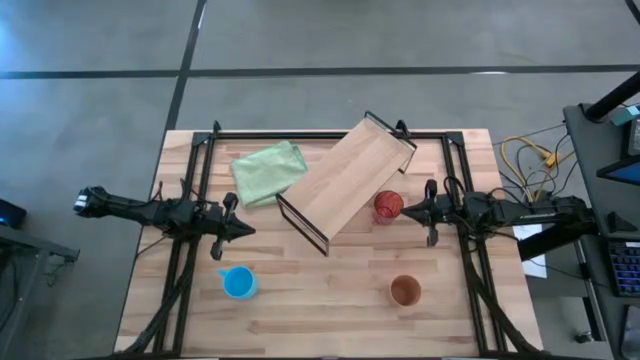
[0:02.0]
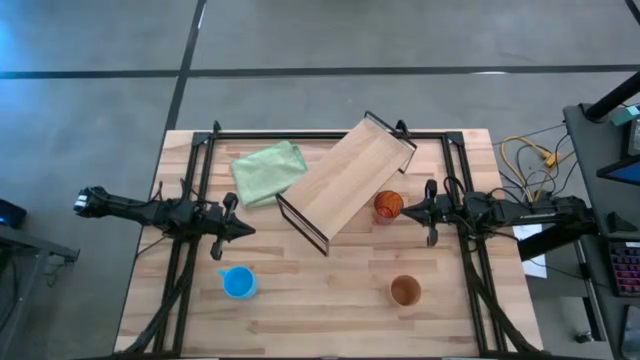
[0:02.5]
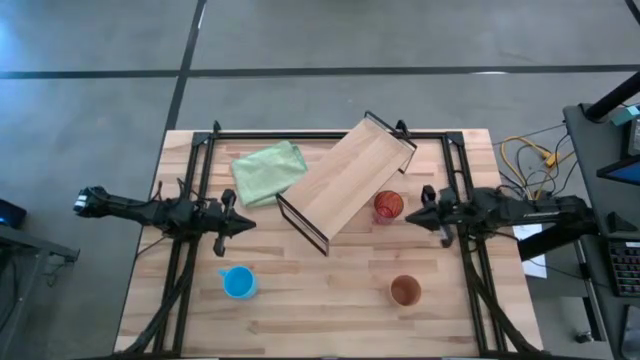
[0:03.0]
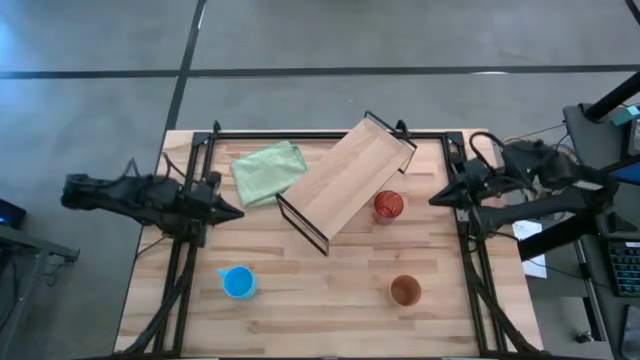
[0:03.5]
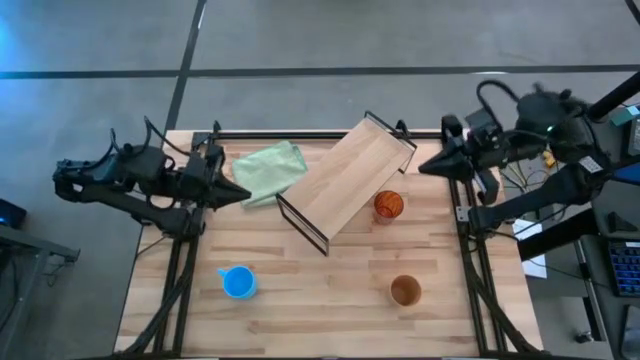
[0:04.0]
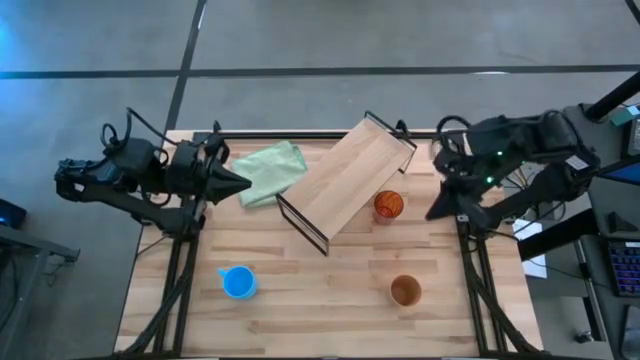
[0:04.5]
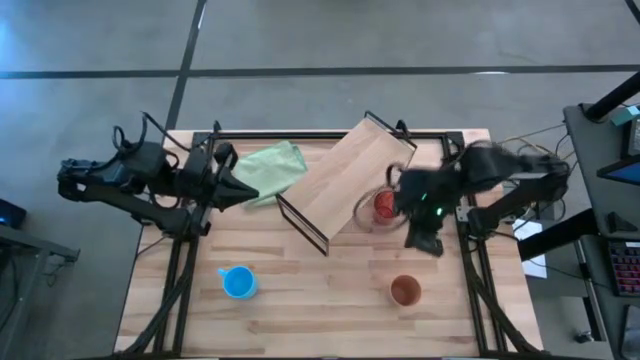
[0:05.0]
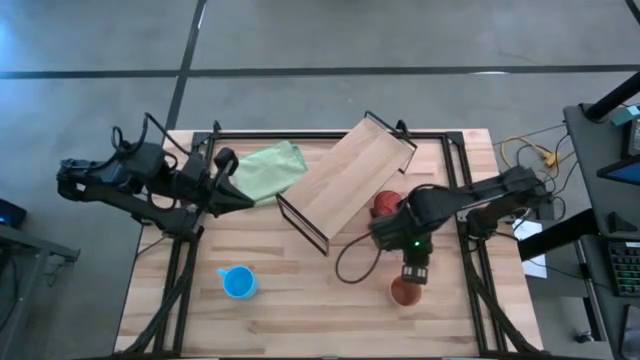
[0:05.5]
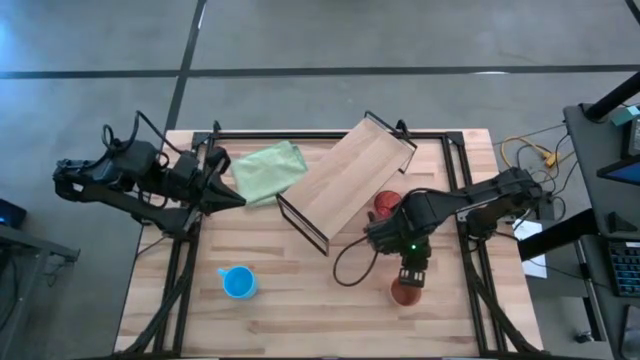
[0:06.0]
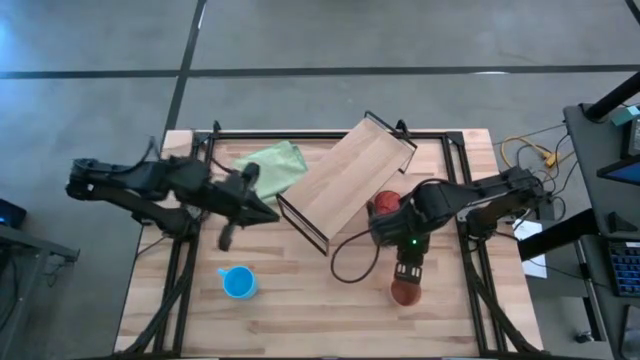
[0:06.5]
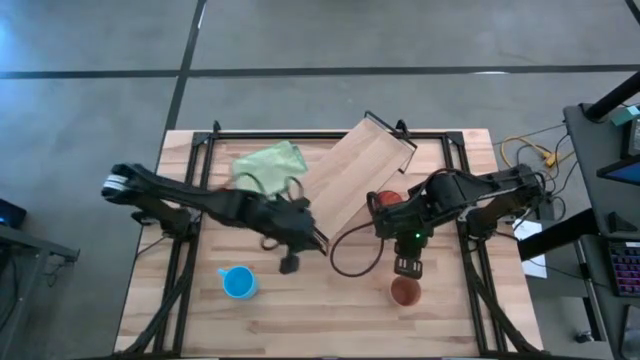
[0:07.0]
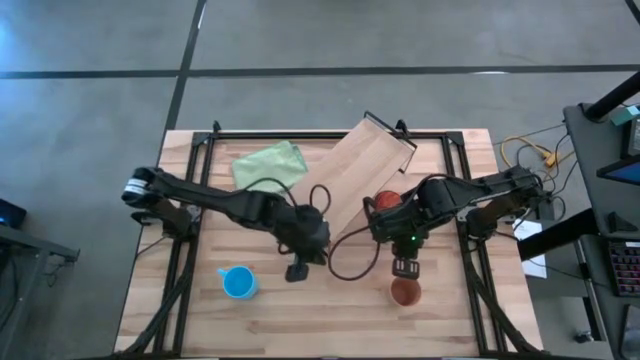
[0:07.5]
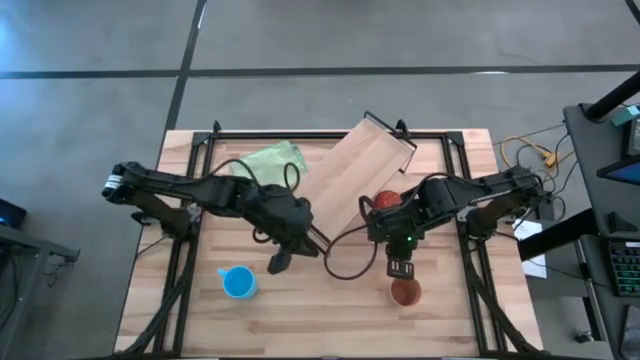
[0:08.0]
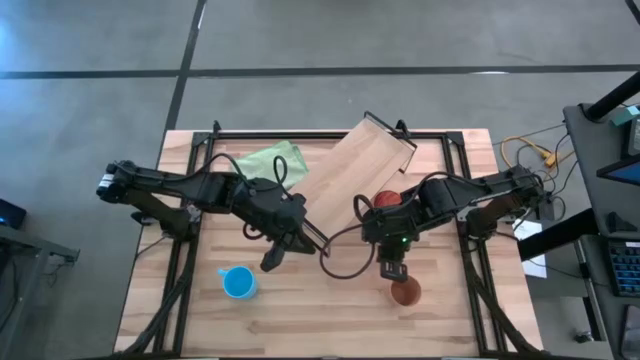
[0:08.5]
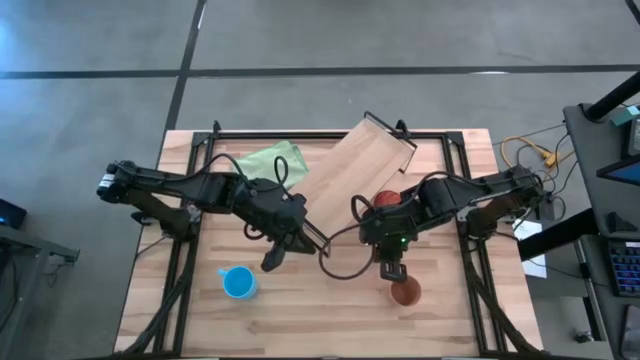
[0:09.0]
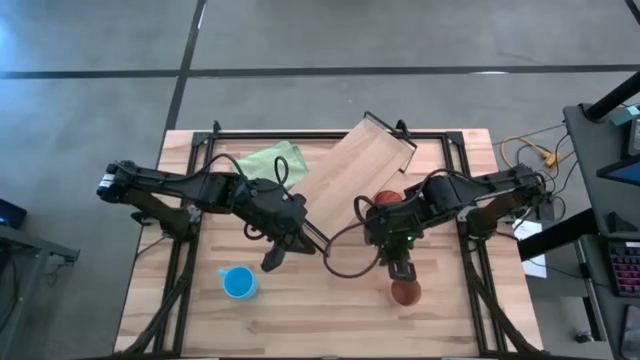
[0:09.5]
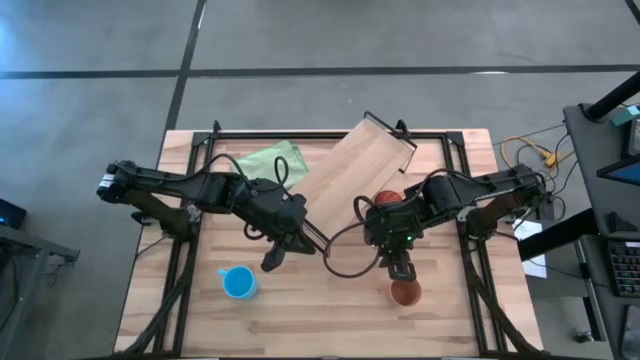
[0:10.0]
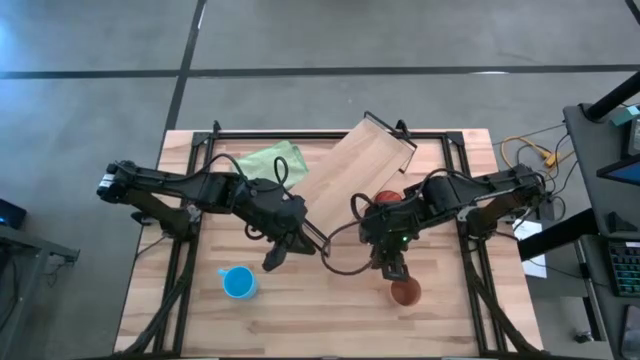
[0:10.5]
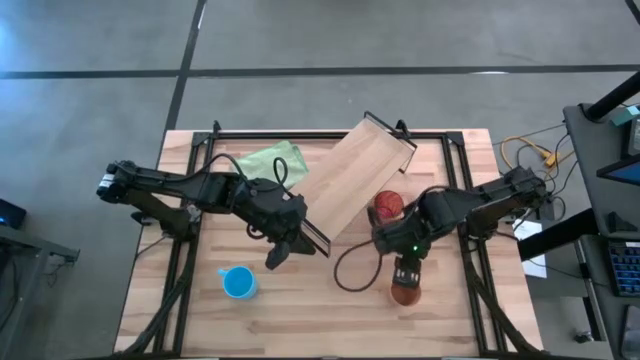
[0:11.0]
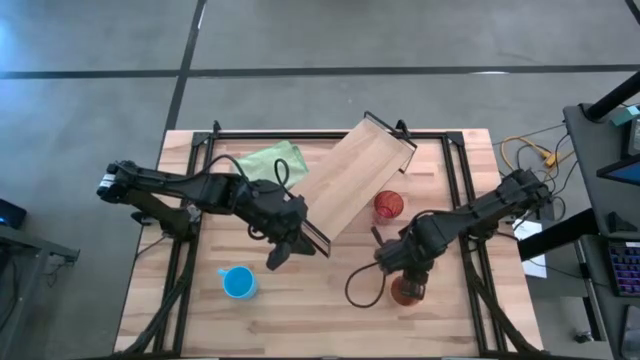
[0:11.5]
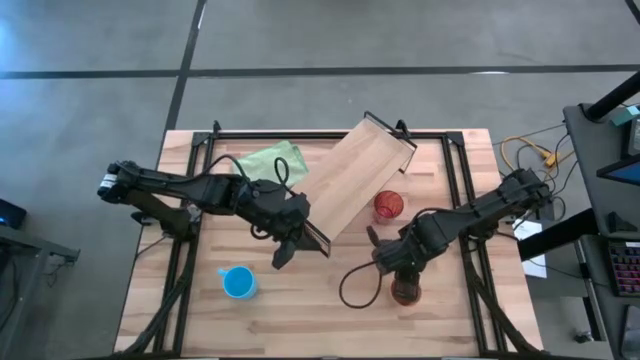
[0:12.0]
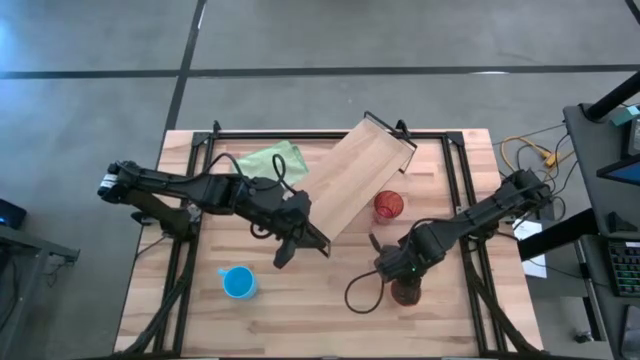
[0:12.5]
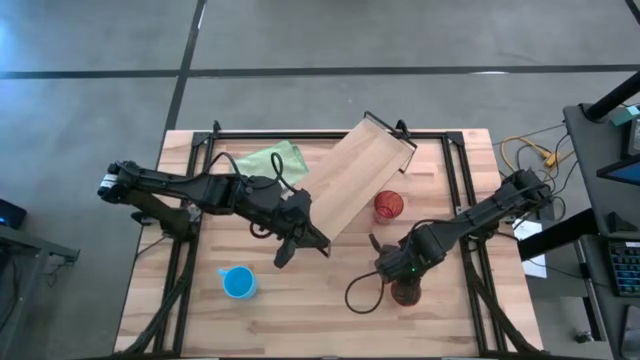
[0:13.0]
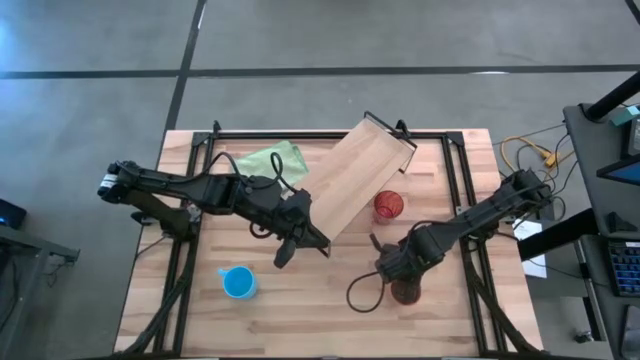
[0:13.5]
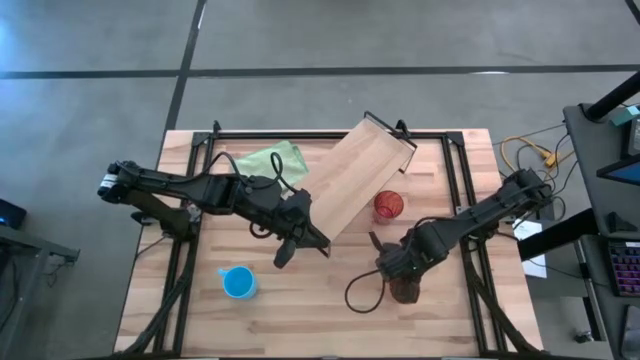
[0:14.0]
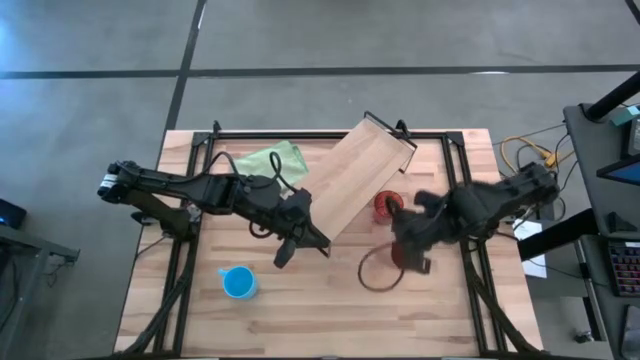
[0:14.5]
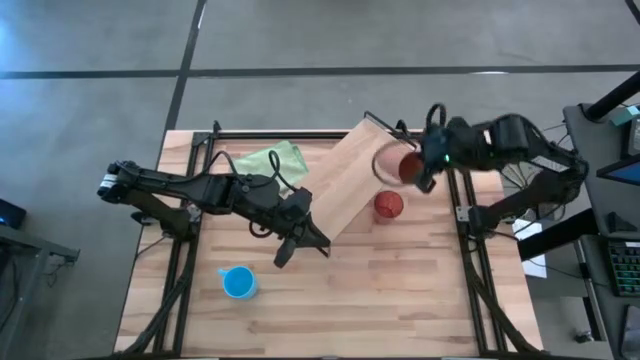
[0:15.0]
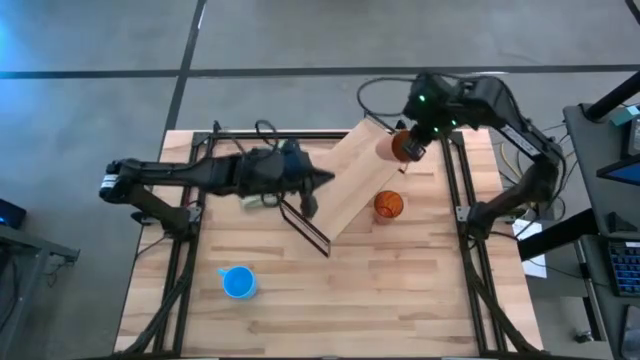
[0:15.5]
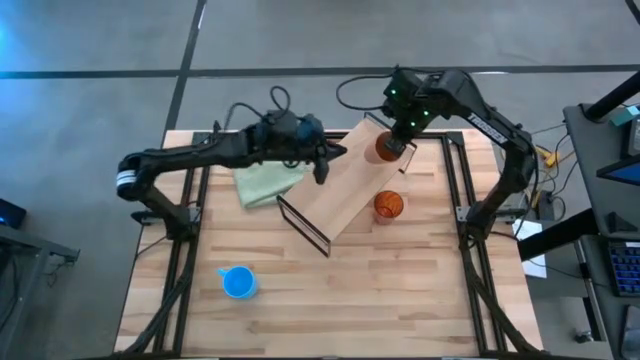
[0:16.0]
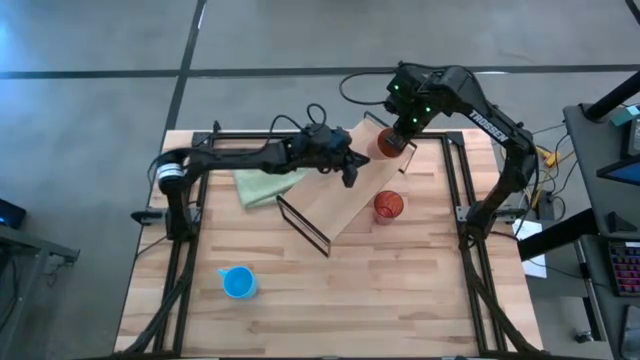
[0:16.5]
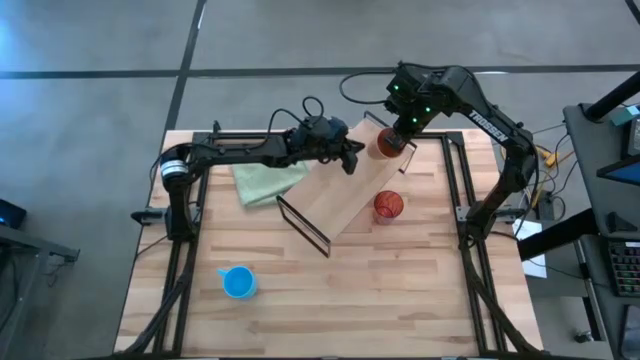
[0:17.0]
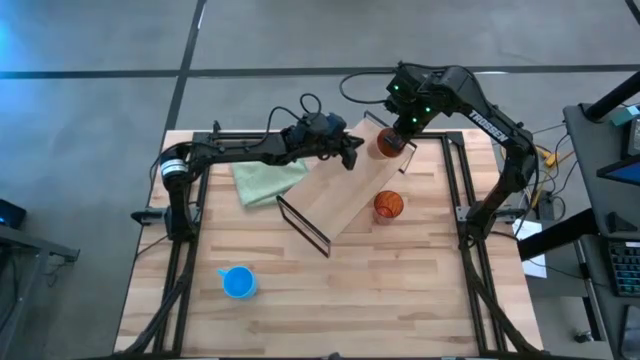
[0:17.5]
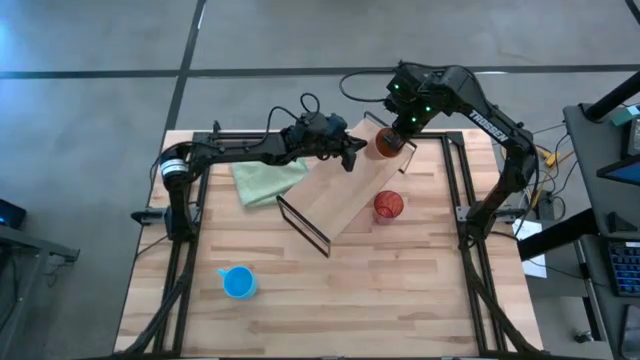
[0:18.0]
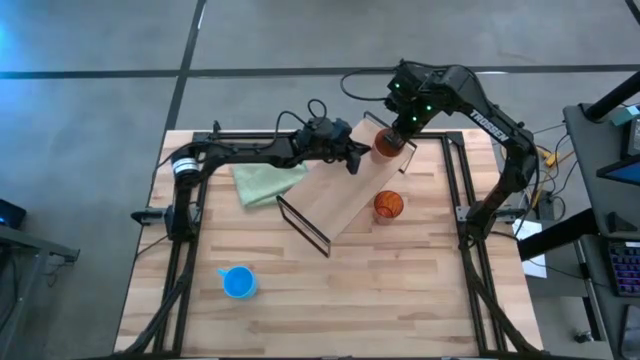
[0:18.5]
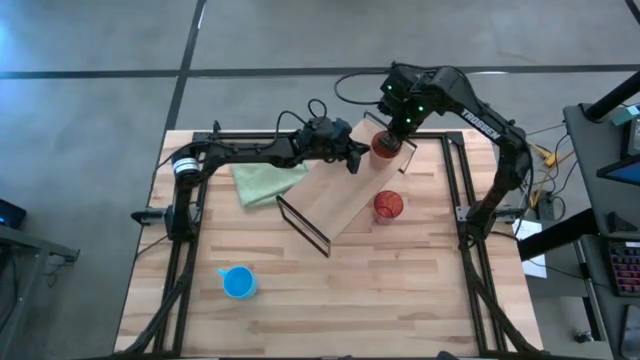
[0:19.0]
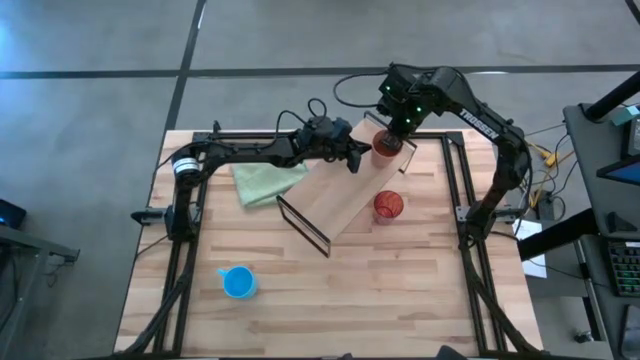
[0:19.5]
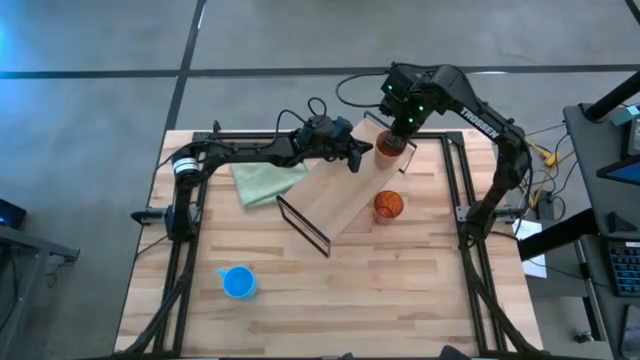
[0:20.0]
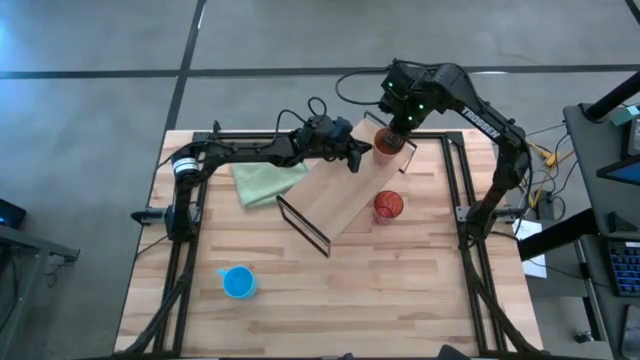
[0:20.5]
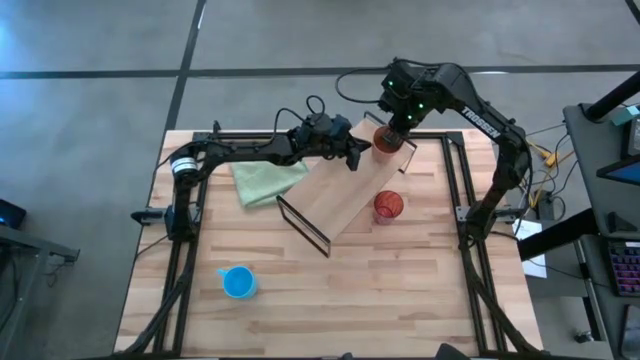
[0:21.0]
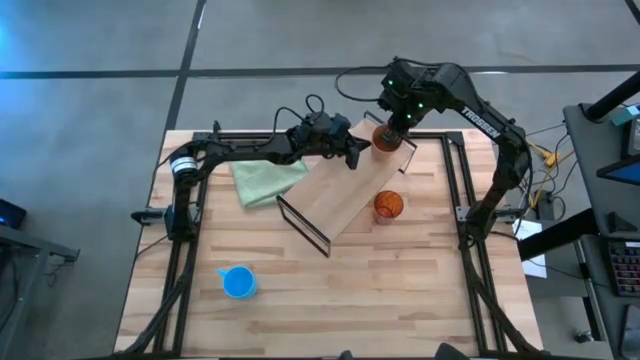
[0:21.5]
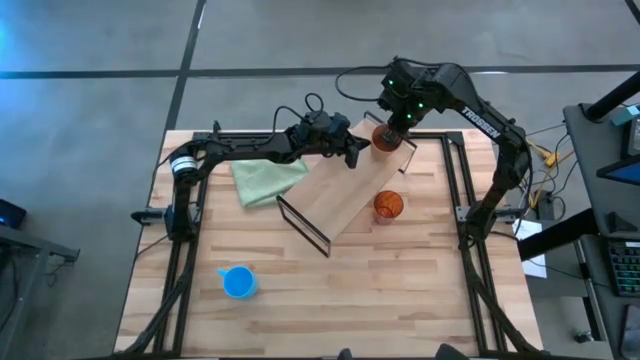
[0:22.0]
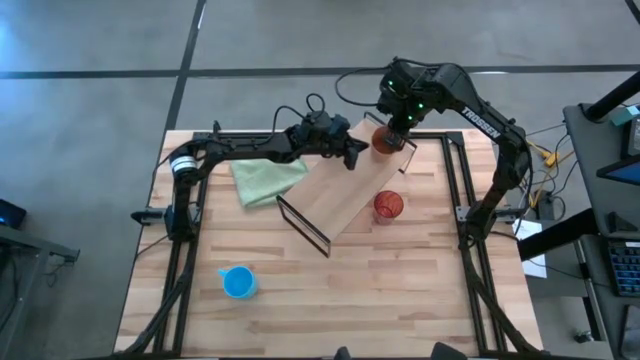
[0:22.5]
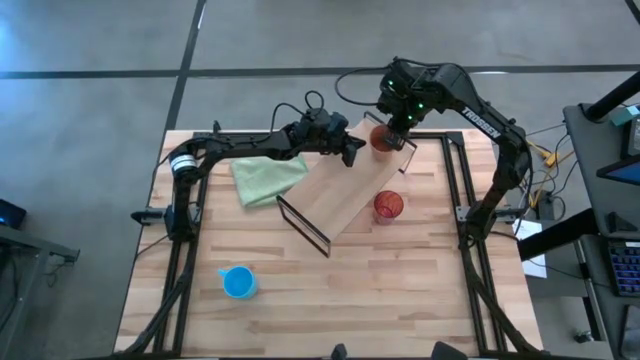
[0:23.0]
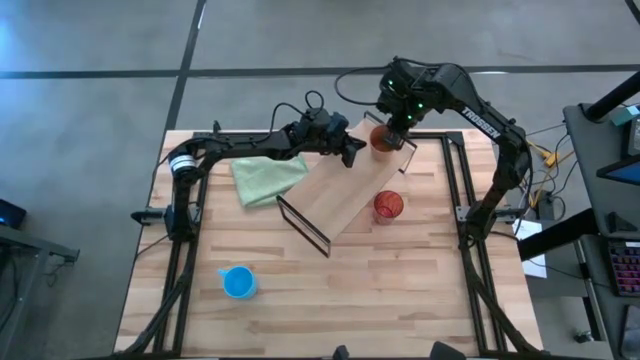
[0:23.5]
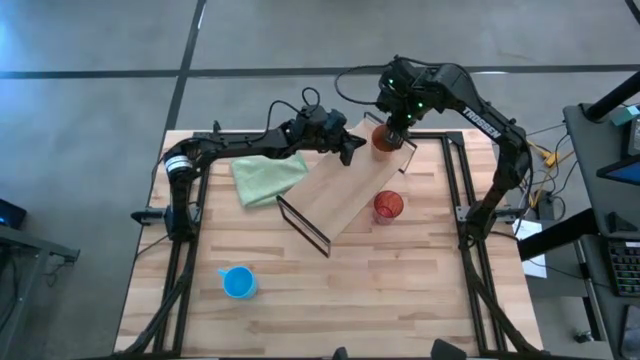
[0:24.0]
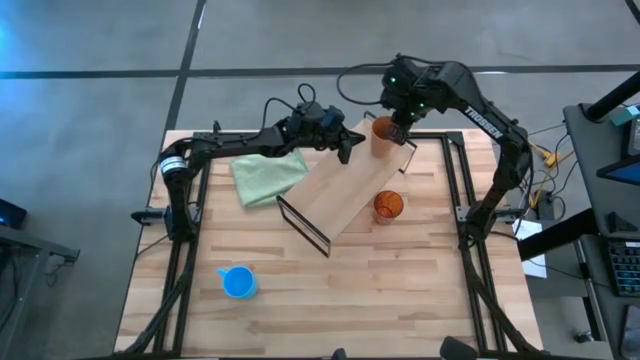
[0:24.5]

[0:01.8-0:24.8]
Task: Stack small to large cups/mugs on shelf
Put the brown cup on the shelf
